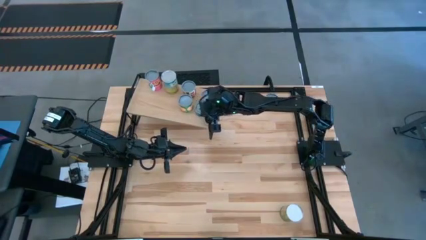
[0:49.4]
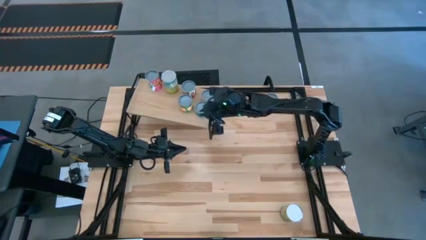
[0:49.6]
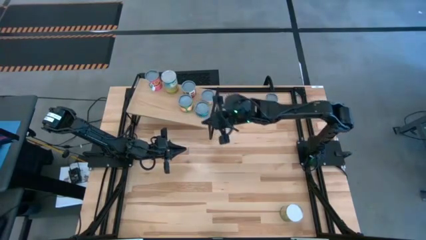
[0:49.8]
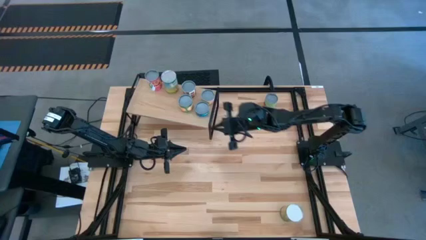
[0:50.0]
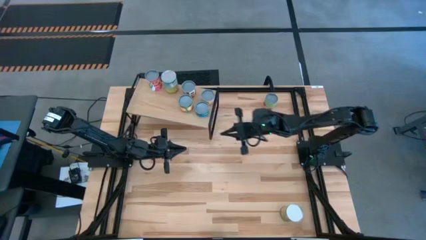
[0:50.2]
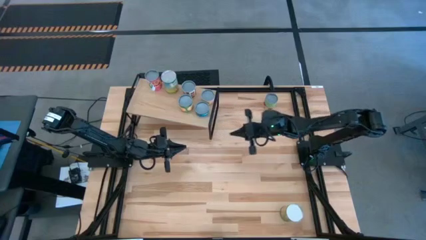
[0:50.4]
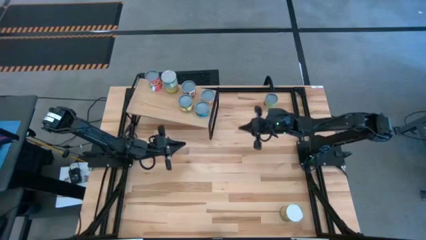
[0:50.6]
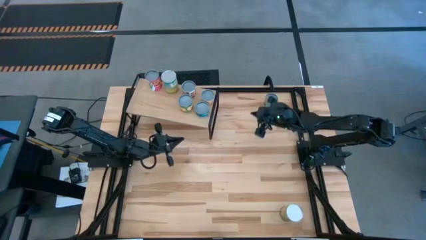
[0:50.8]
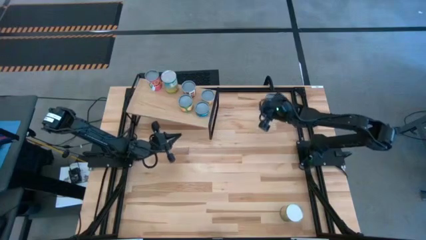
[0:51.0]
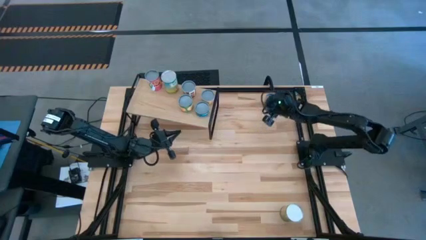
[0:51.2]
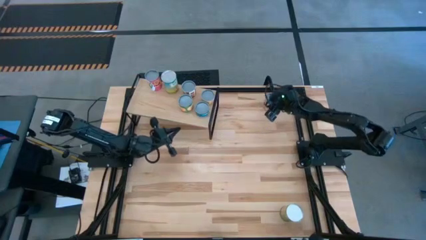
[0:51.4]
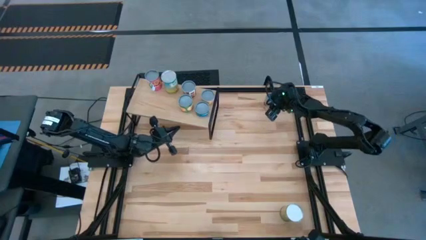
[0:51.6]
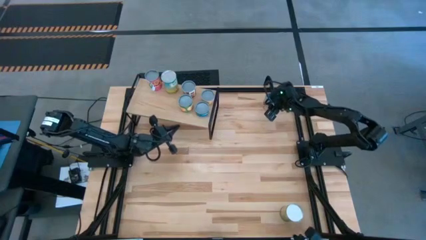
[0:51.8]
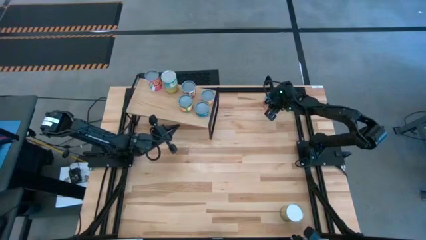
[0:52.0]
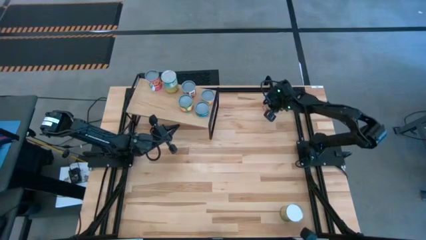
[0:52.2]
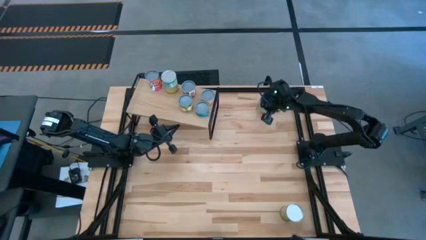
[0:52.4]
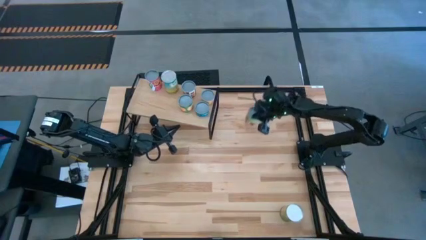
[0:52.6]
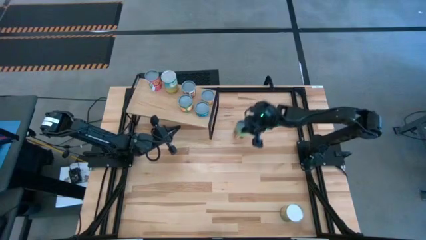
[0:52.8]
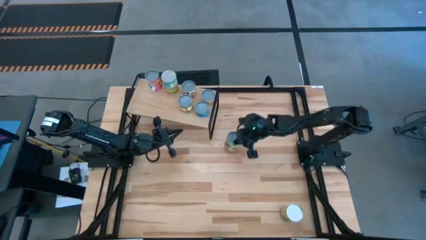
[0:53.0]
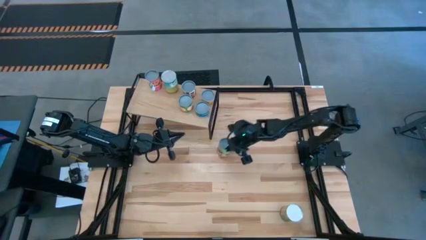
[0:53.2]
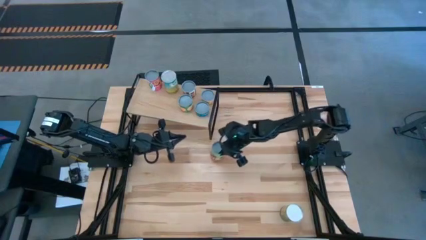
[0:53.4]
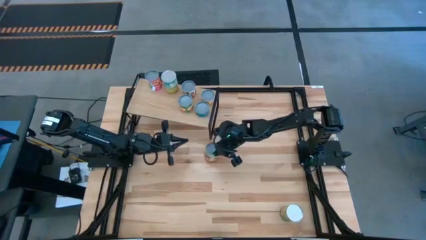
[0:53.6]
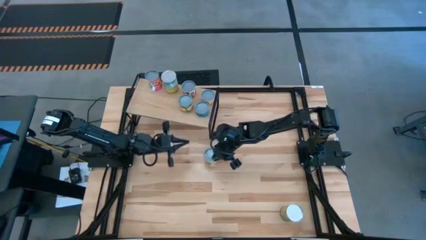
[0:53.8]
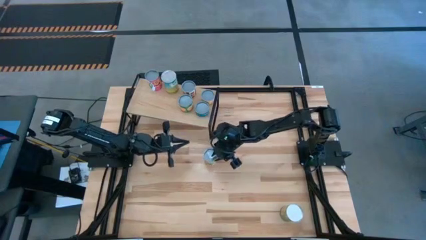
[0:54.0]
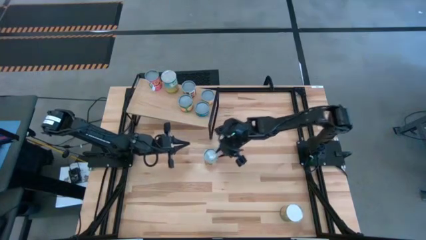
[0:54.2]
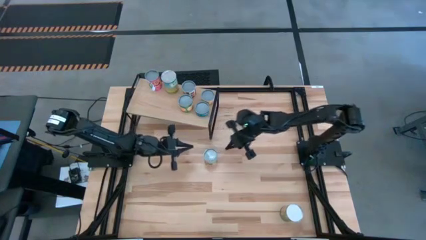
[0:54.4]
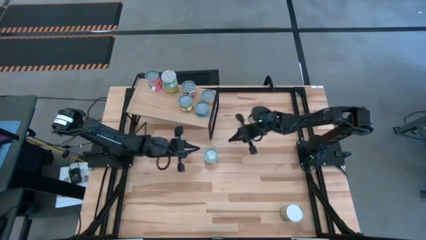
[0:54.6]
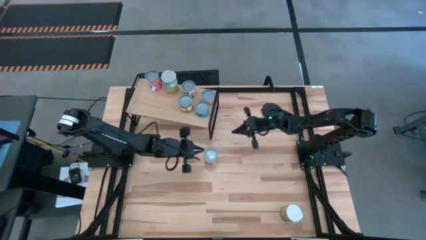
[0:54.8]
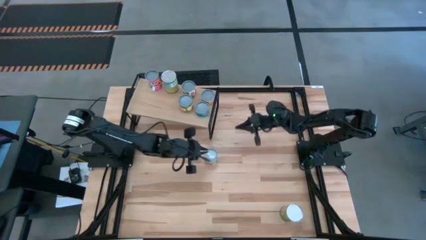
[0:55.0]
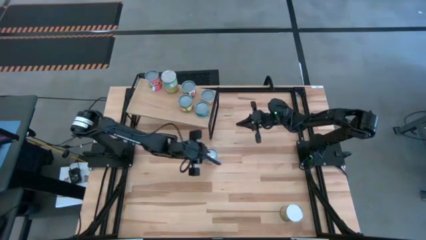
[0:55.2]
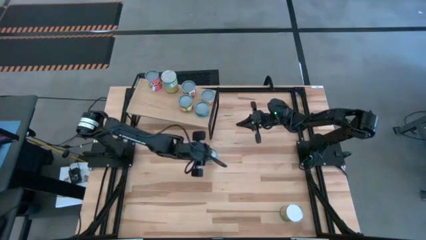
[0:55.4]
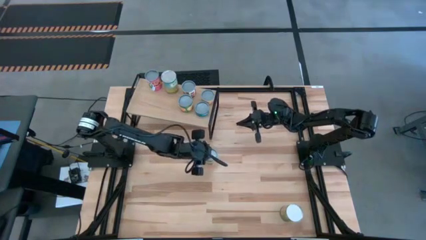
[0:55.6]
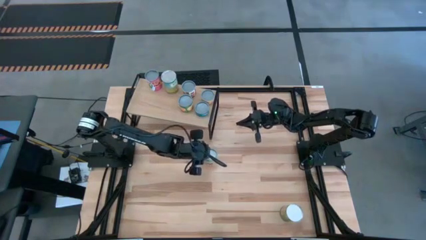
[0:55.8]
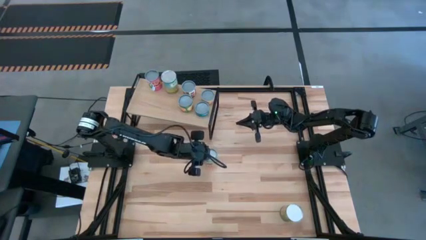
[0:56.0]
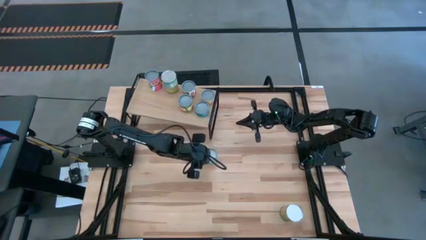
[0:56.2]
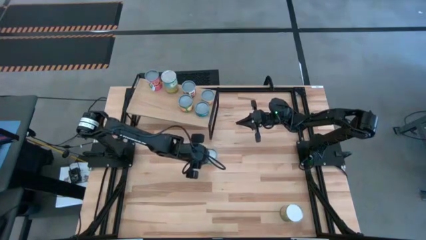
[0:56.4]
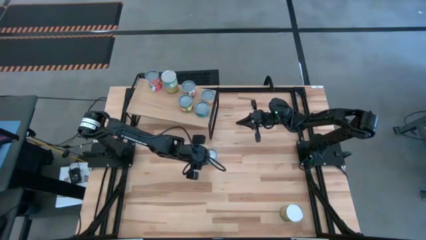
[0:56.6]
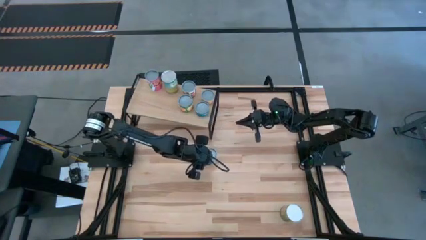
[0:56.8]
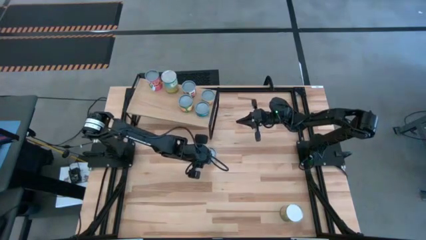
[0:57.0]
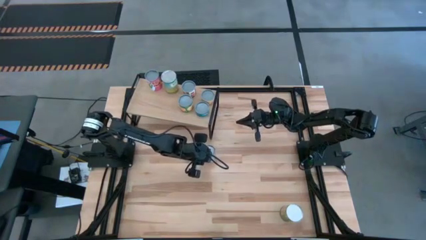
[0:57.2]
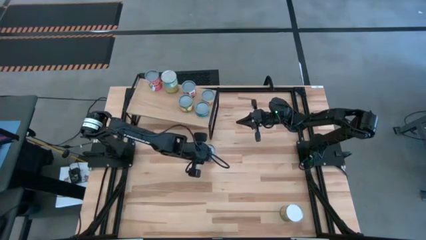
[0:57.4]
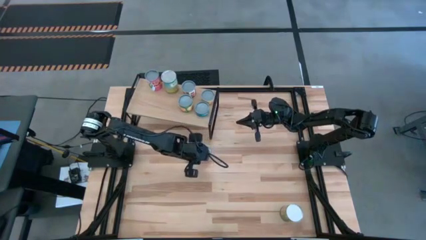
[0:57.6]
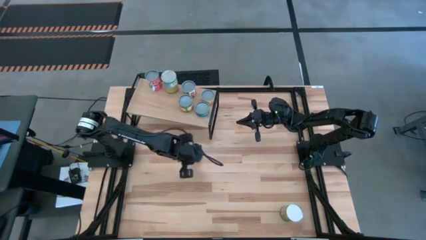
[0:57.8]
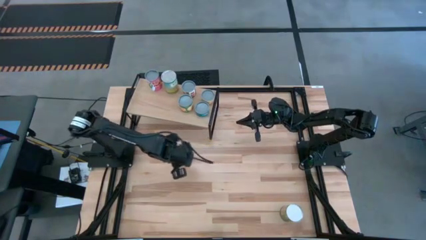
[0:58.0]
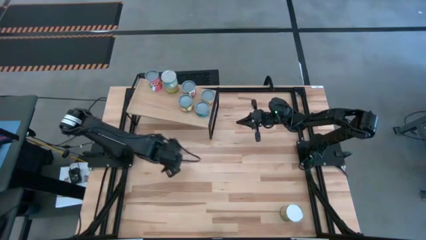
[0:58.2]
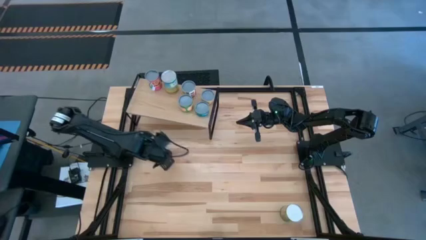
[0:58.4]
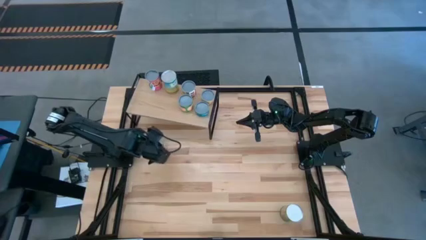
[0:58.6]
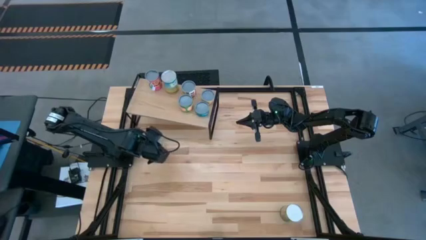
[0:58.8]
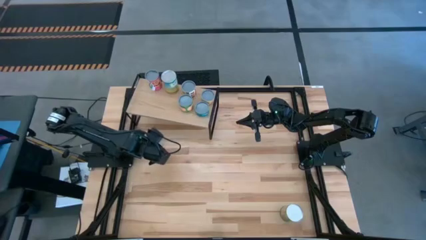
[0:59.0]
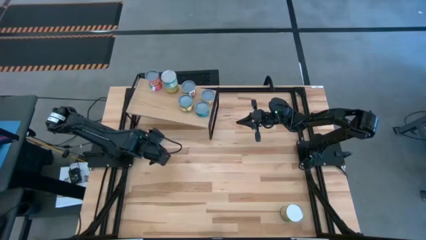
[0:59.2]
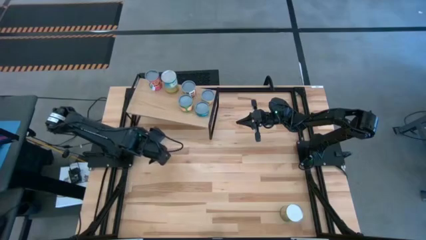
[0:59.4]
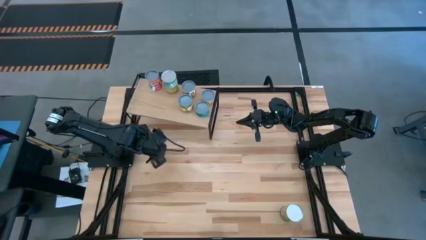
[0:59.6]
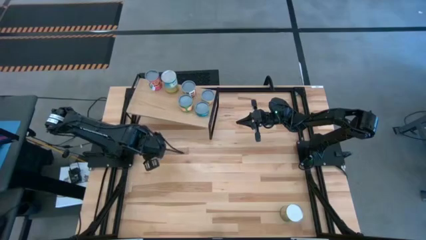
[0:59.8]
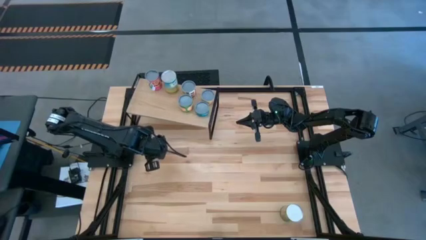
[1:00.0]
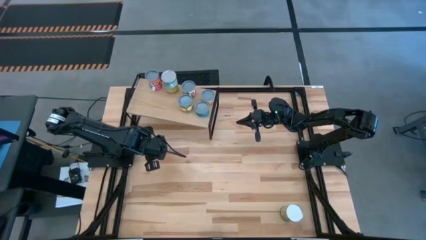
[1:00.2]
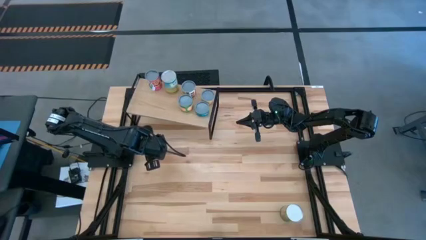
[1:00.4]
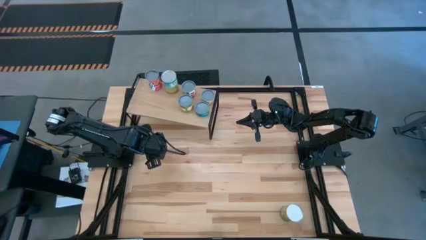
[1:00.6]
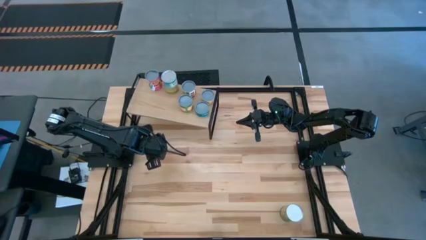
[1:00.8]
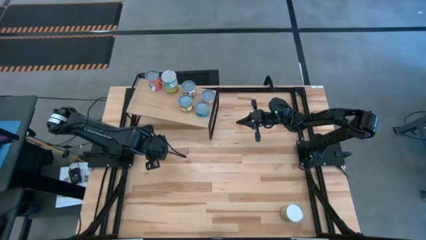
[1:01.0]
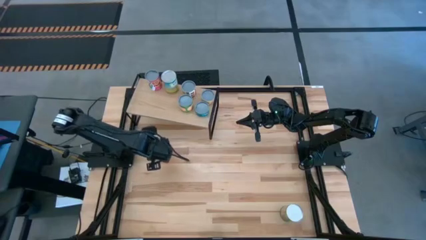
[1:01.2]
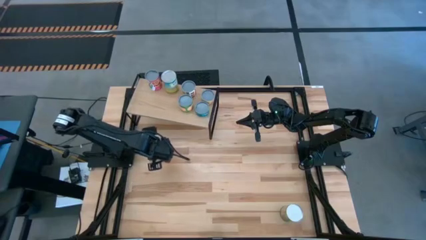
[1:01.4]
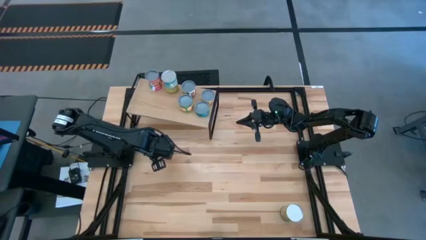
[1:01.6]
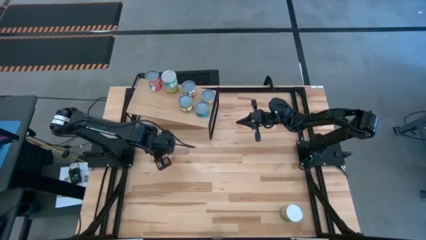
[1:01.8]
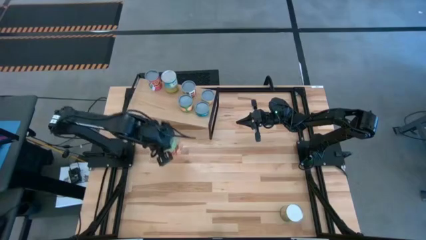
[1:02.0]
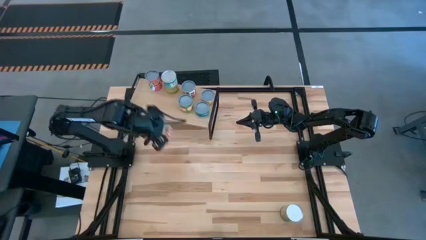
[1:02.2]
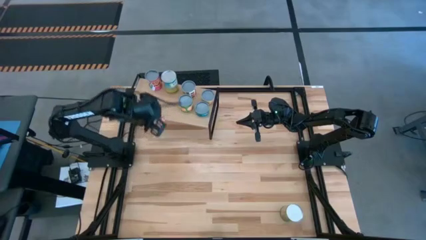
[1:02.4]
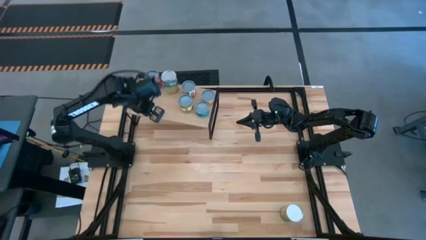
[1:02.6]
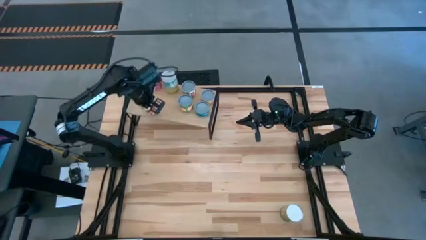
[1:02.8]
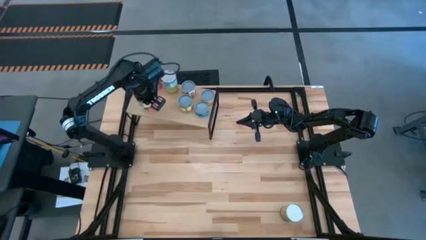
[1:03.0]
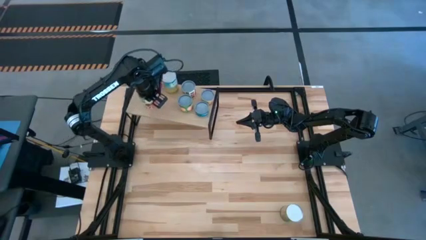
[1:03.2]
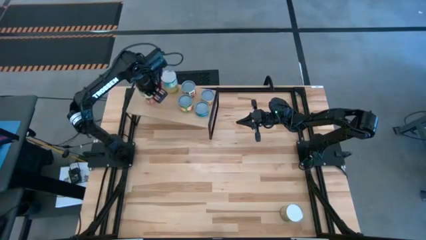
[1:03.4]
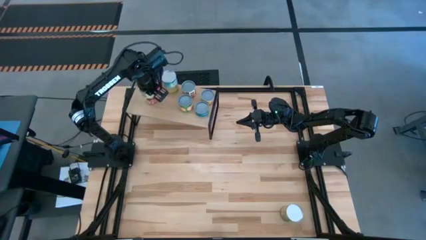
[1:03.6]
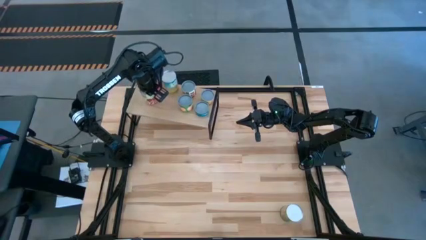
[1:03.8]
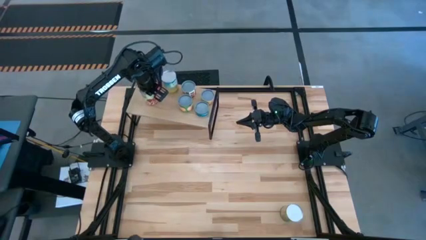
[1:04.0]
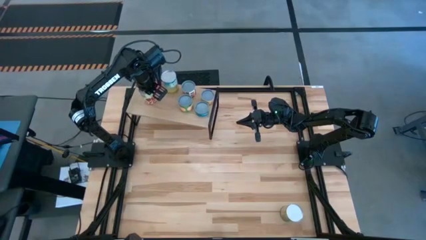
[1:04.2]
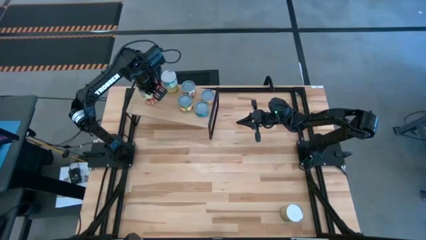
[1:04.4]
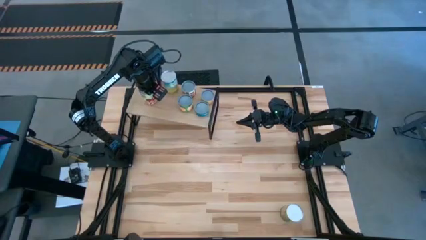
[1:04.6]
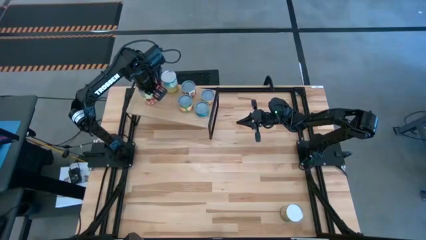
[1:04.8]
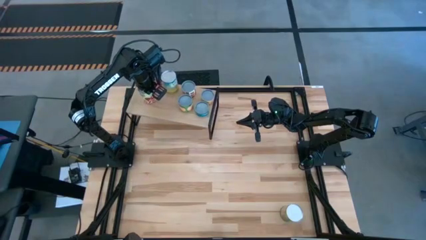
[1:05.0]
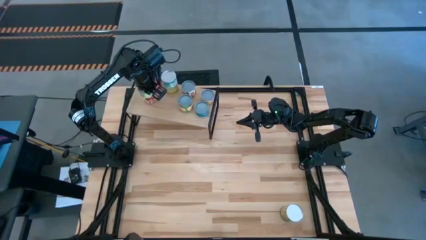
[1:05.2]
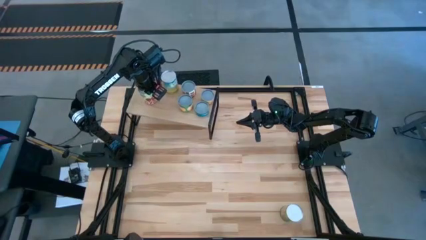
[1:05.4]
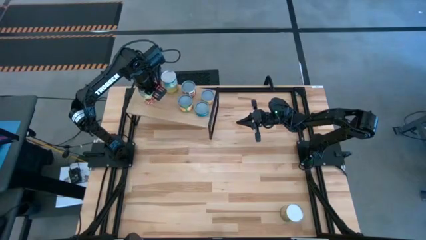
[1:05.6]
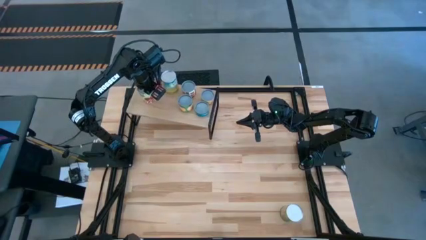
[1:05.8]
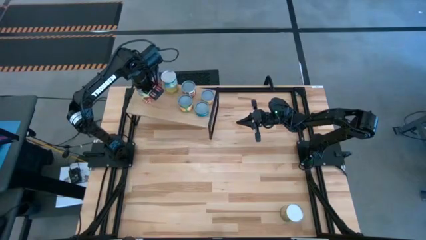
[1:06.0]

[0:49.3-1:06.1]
Task: Pick and place cans onto a shelf
Put the canned spaghetti sauce on the shelf
